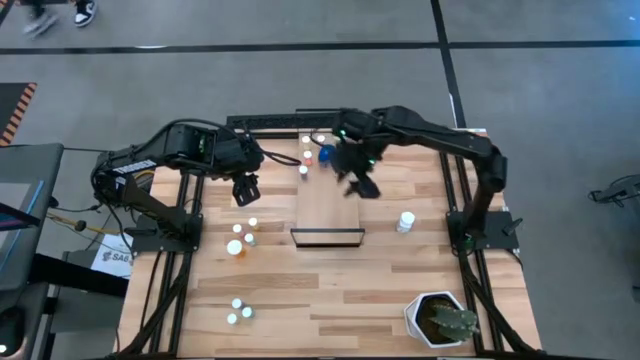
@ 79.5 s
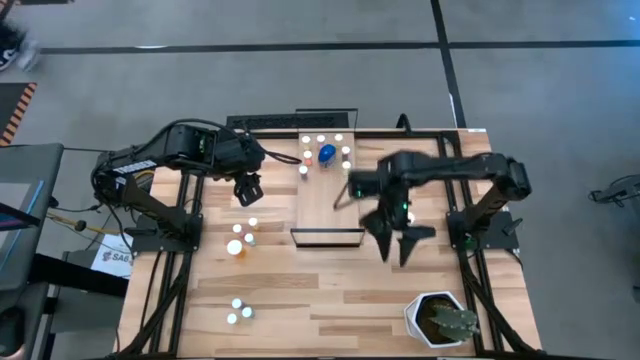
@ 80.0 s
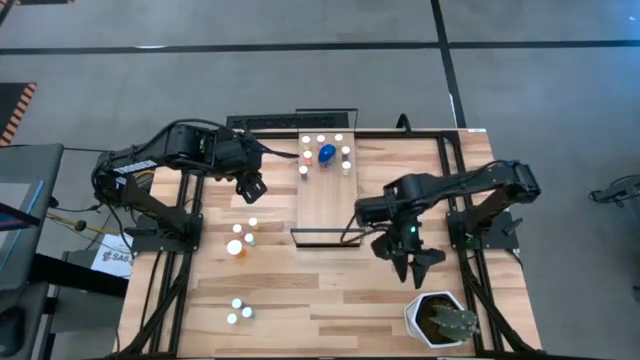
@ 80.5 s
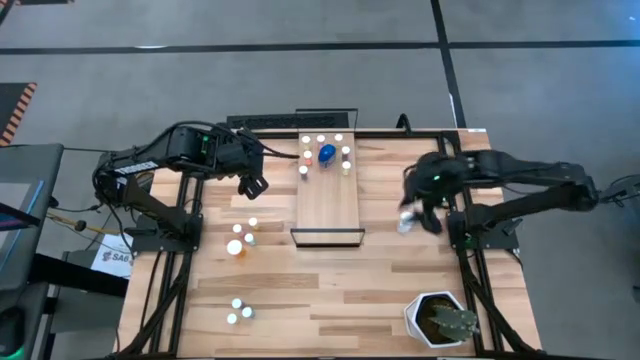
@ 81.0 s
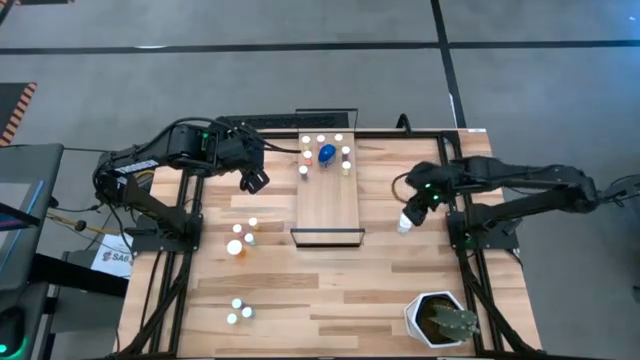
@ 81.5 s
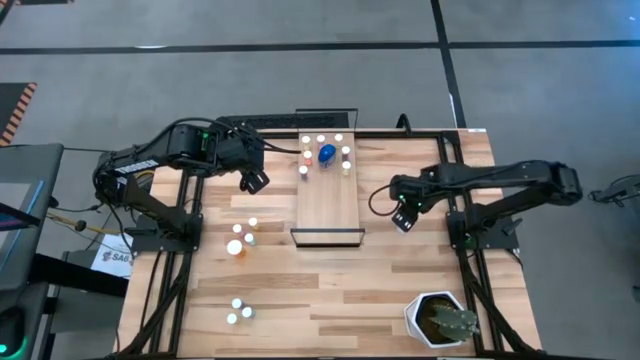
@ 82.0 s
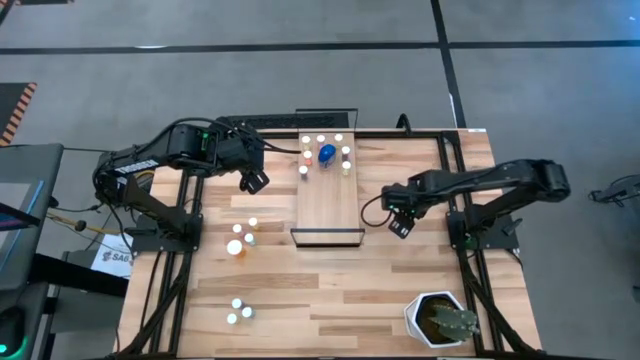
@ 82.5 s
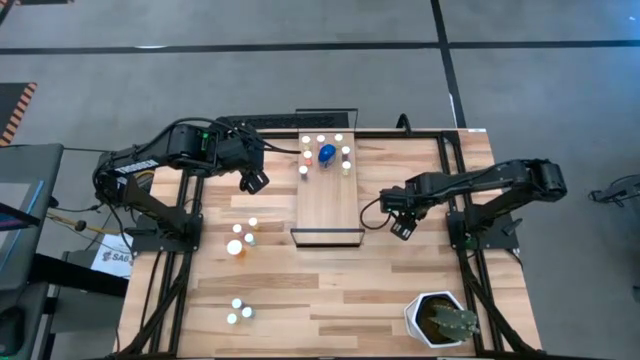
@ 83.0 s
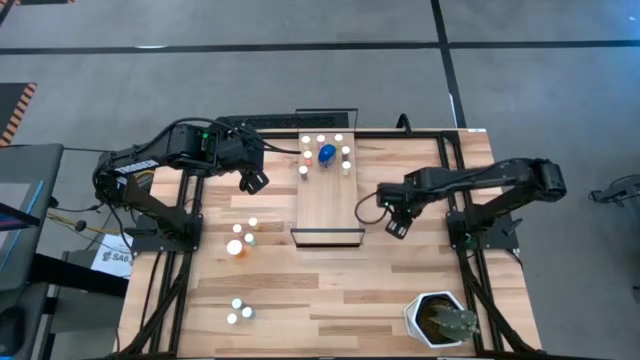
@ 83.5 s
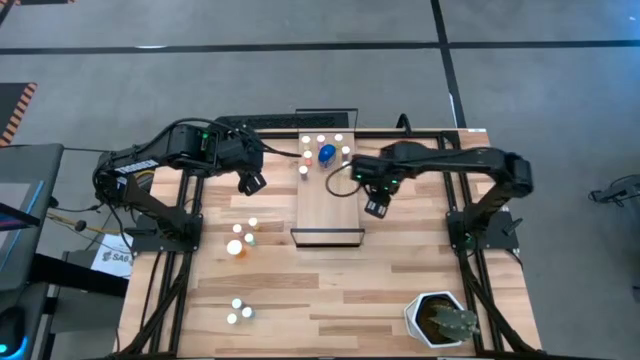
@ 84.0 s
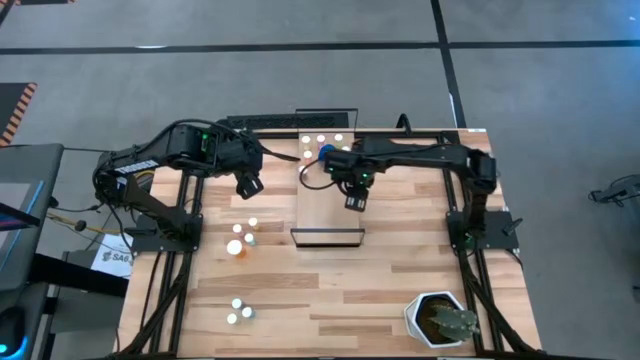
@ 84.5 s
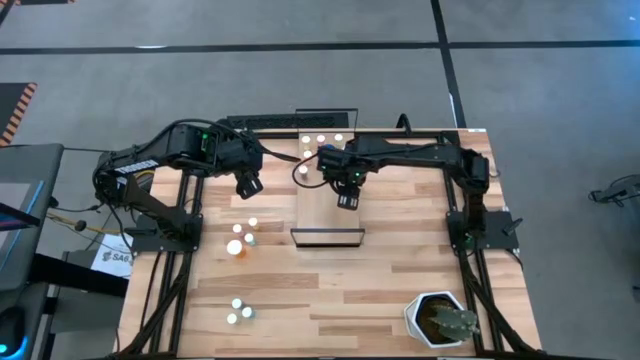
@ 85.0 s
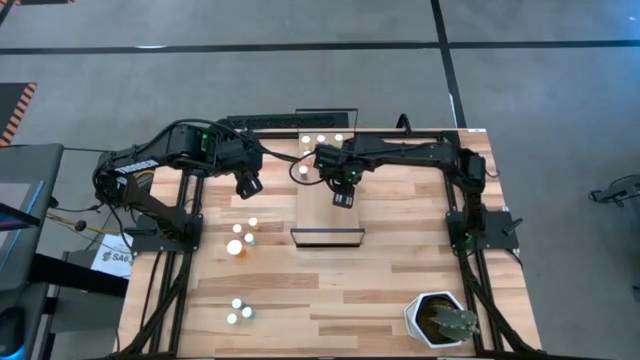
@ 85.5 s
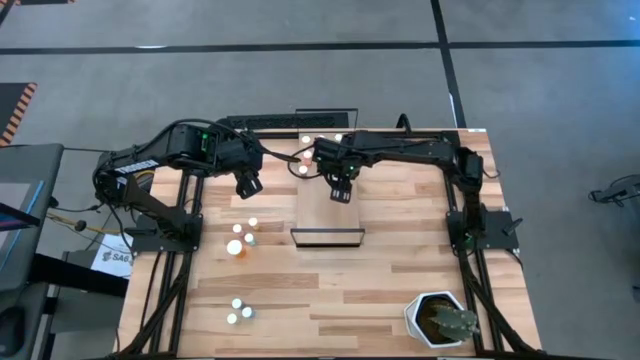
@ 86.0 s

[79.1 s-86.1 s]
Task: Pick and place medicine bottles onto shelf by color
Put the white pill bottle on the shelf

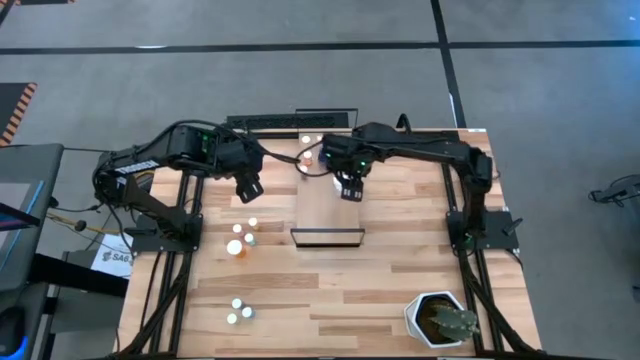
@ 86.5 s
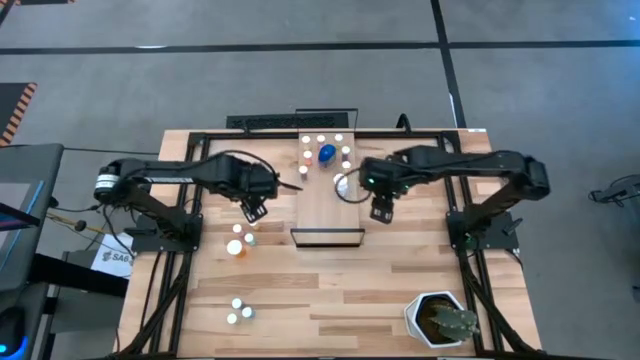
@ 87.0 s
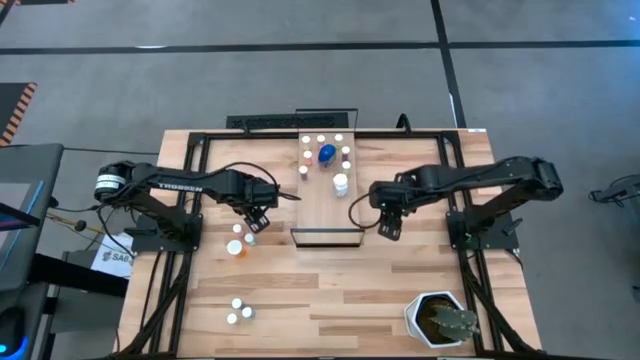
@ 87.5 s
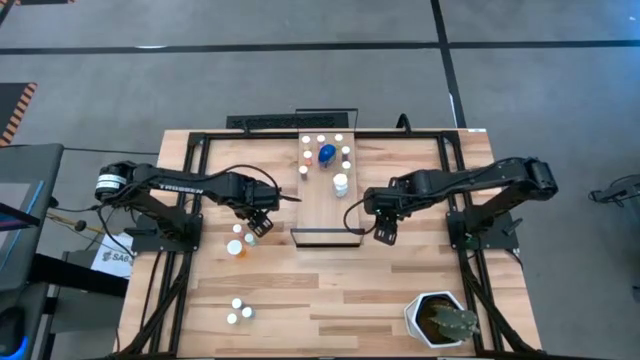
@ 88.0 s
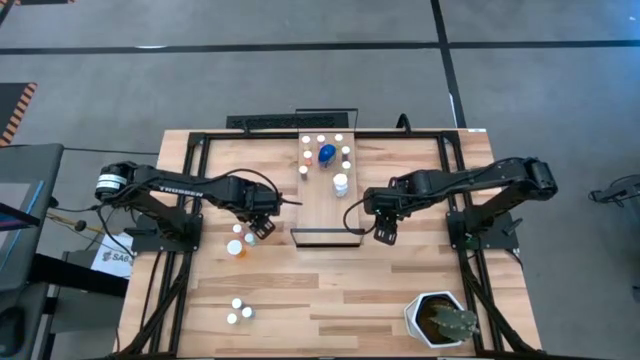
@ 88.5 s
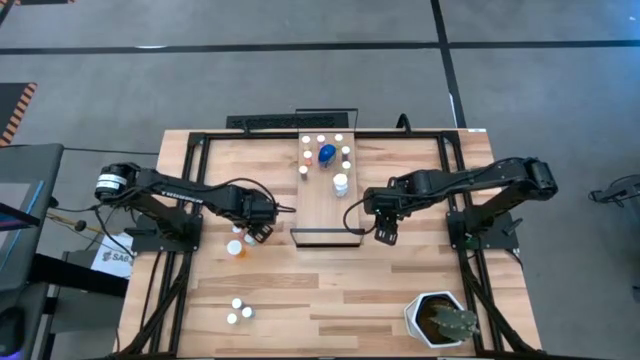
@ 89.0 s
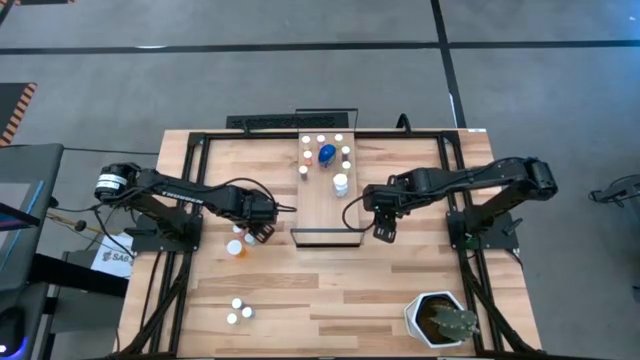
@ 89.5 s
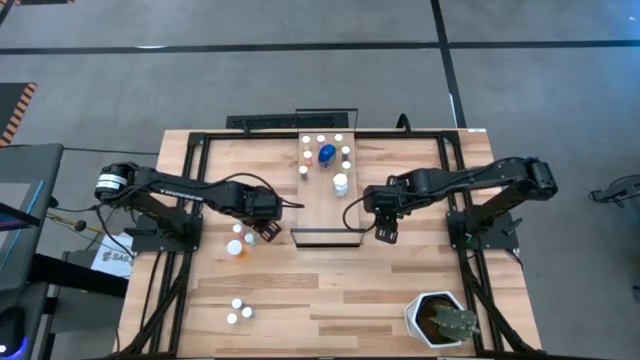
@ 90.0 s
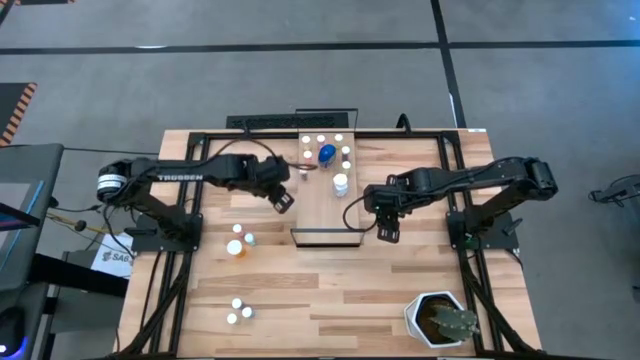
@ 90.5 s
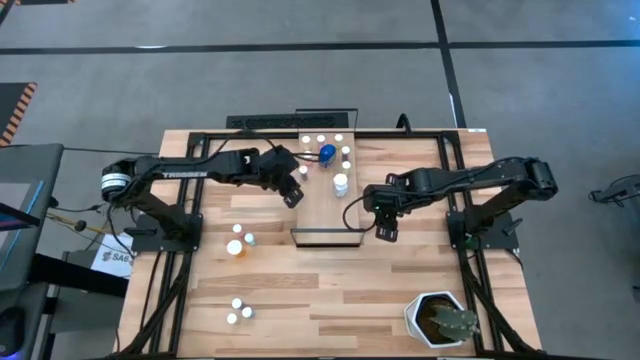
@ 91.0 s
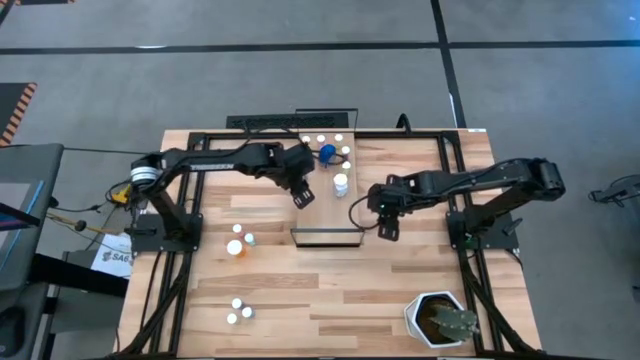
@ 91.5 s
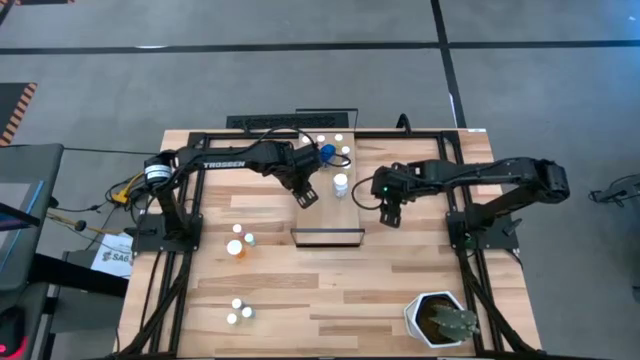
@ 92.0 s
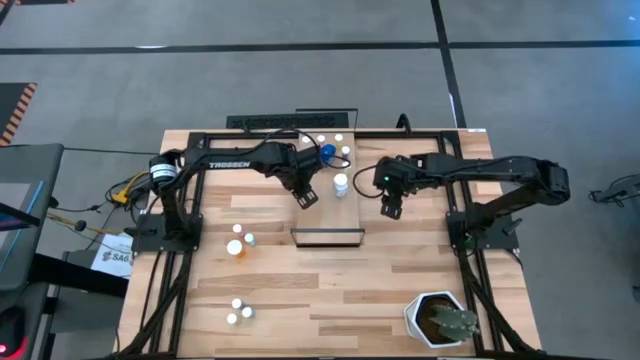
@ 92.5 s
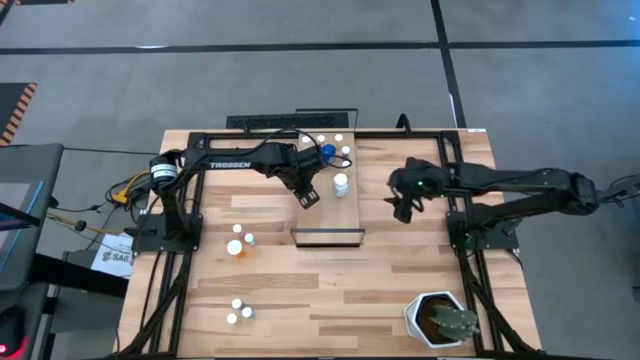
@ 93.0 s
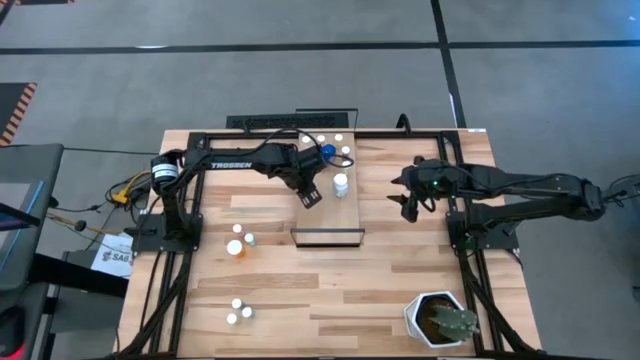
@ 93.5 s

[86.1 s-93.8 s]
Put the yellow pill bottle on the shelf

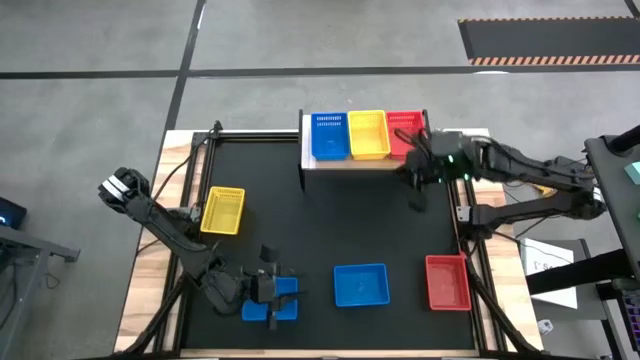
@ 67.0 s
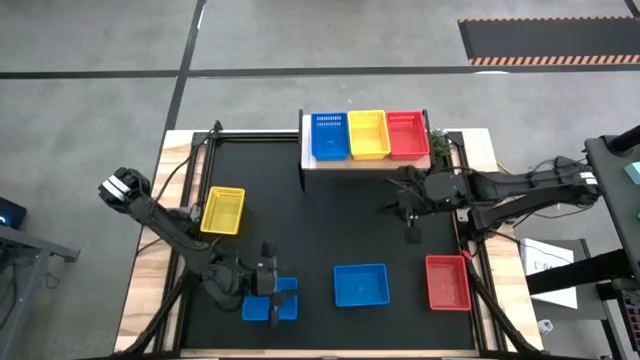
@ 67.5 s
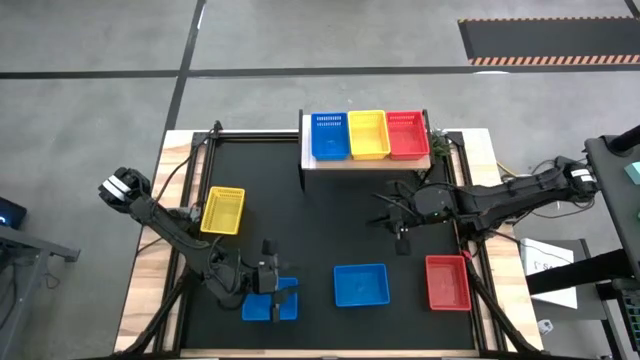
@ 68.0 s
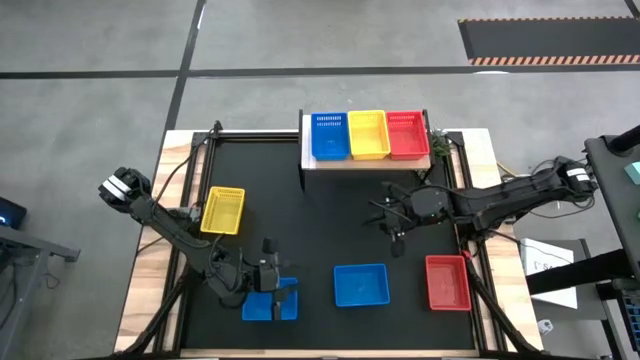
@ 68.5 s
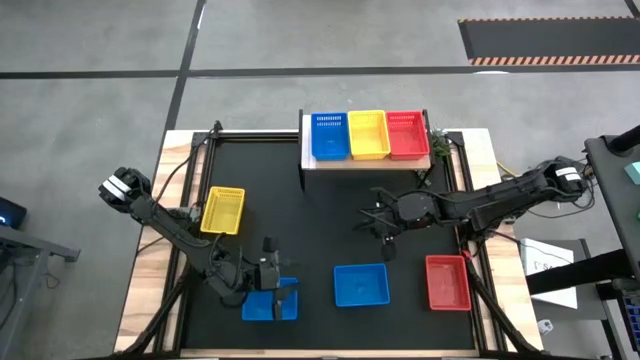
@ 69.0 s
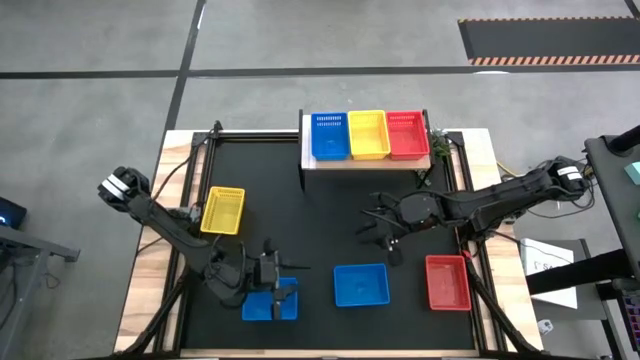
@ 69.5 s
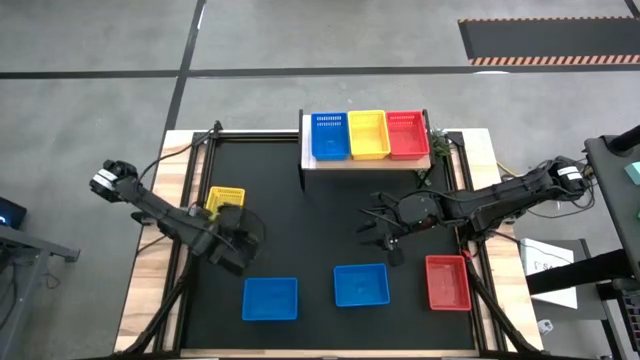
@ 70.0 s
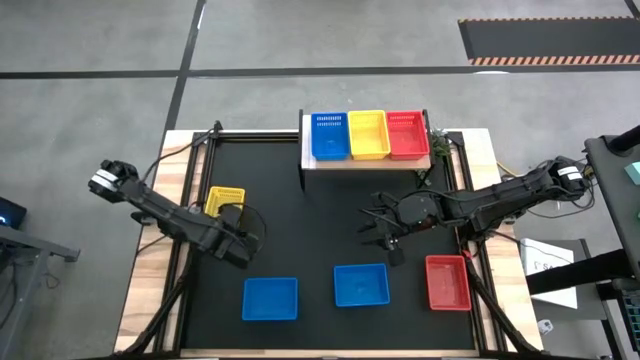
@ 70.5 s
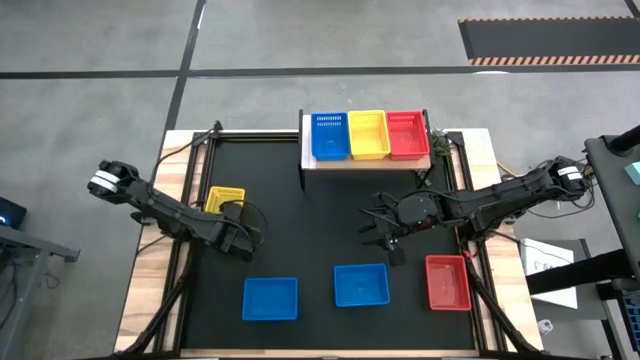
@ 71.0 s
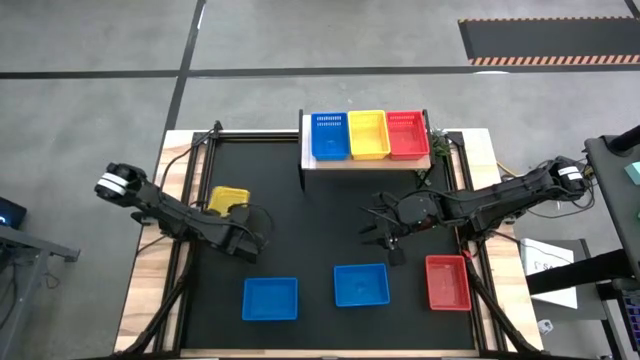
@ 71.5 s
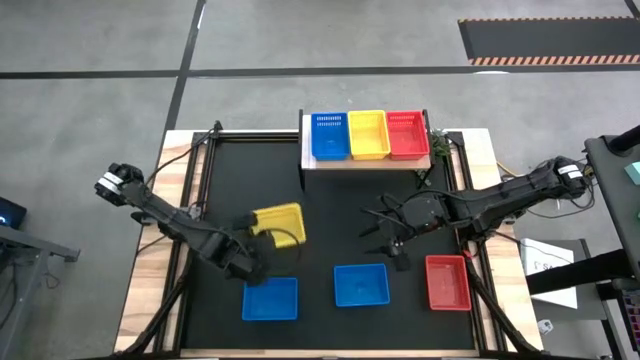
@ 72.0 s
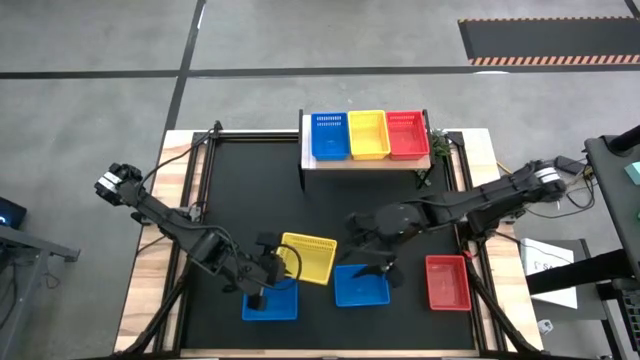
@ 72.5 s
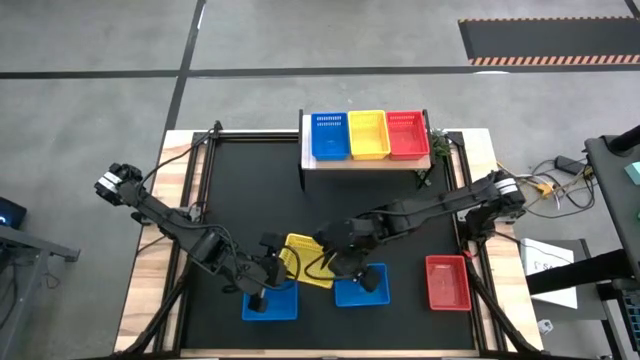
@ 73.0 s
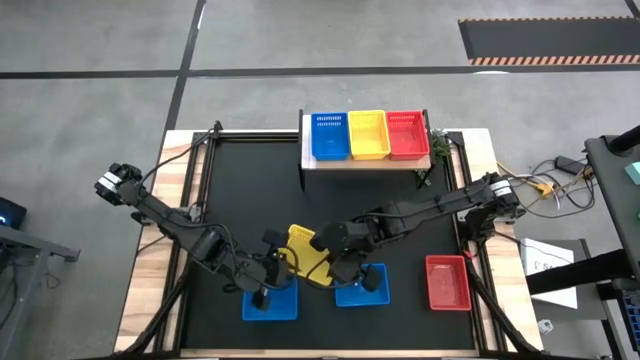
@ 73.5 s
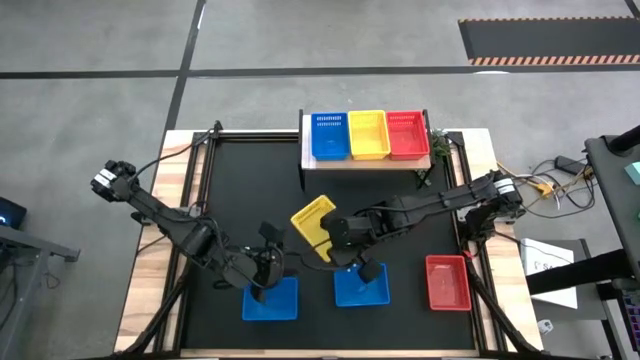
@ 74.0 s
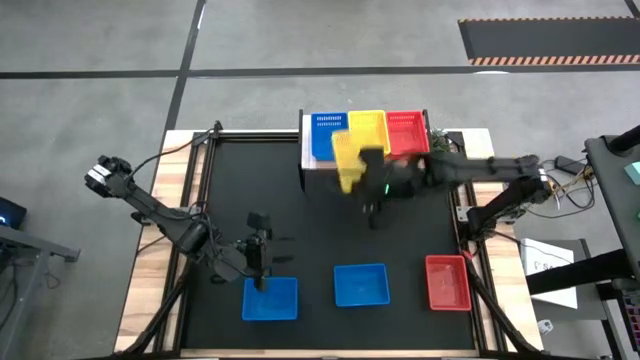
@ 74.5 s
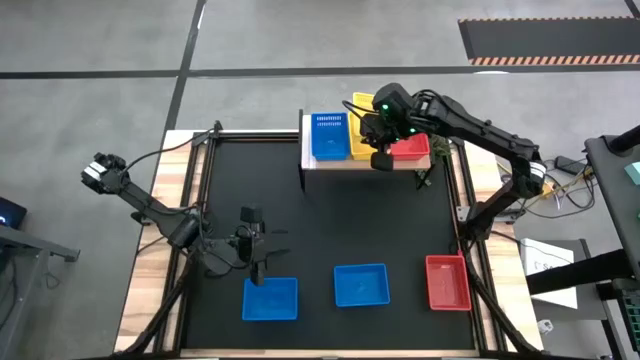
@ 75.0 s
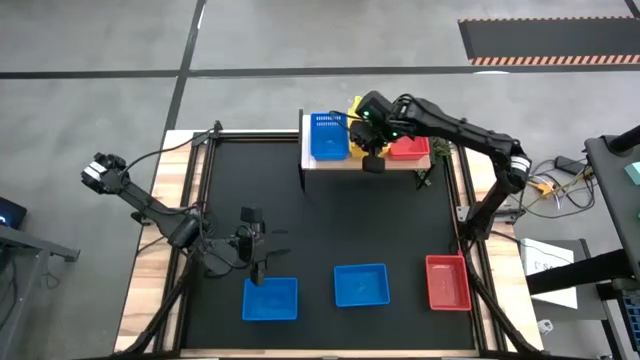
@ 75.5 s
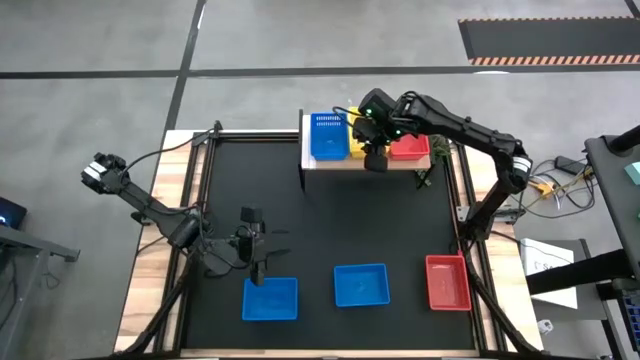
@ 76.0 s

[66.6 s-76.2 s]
Task: Stack baskets on shelf by color
Stack the yellow bin on top of the yellow bin on the shelf
